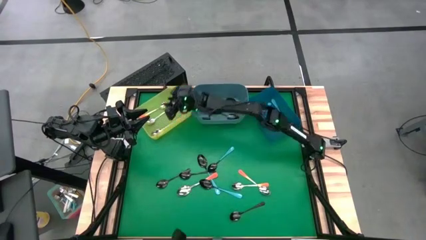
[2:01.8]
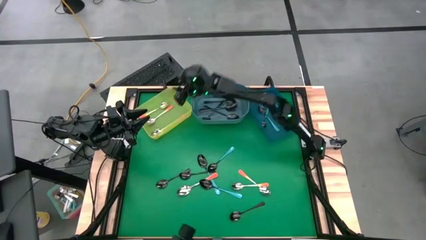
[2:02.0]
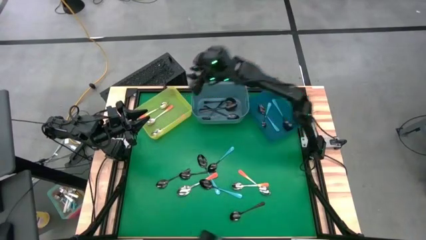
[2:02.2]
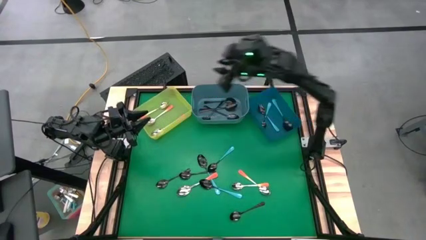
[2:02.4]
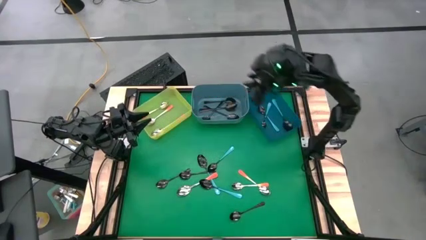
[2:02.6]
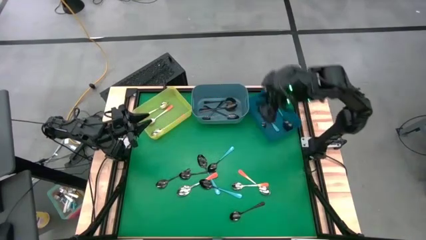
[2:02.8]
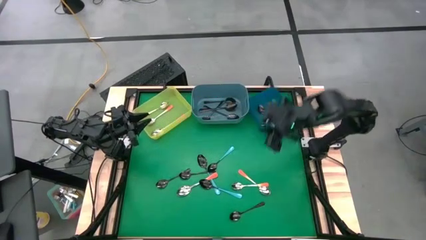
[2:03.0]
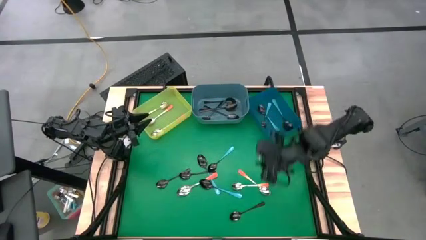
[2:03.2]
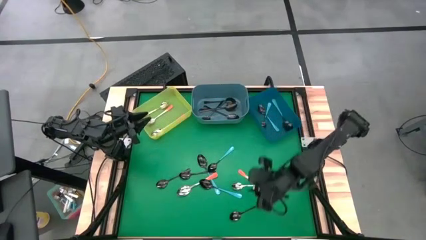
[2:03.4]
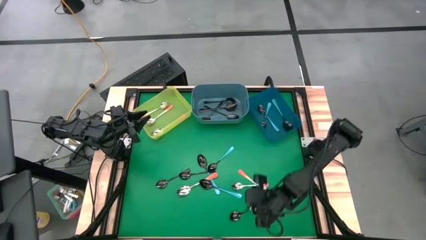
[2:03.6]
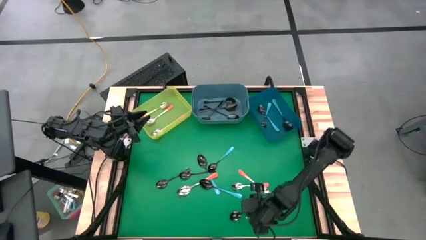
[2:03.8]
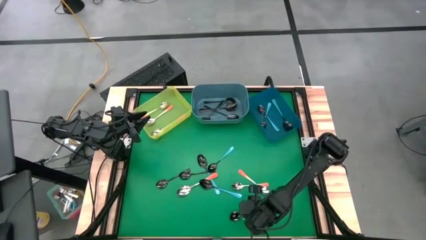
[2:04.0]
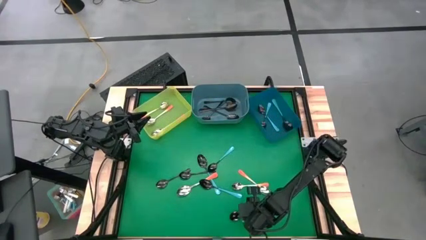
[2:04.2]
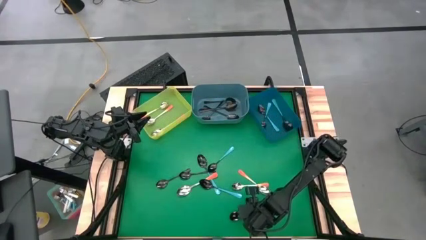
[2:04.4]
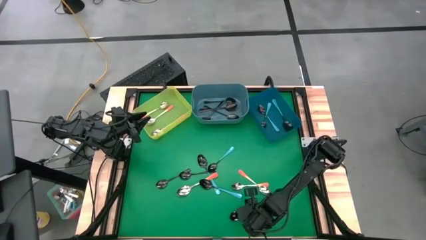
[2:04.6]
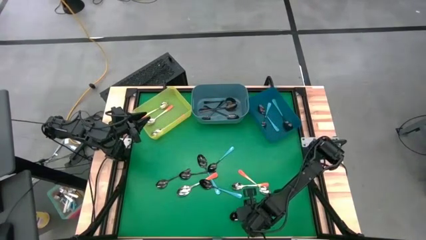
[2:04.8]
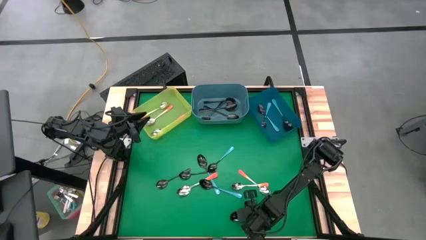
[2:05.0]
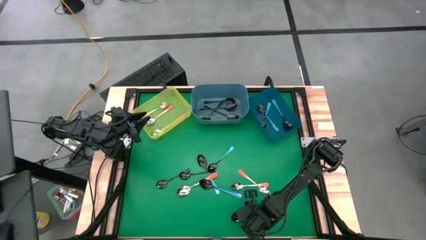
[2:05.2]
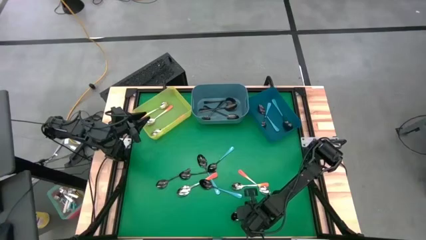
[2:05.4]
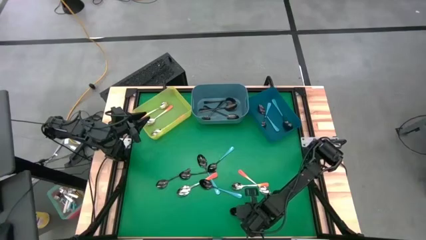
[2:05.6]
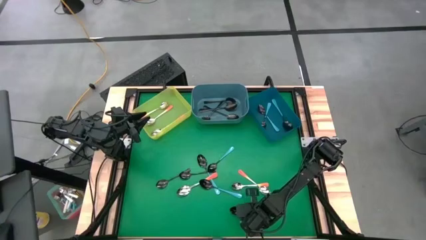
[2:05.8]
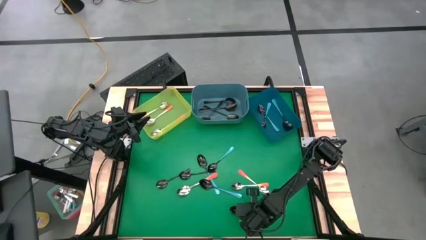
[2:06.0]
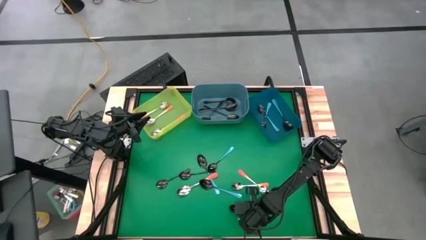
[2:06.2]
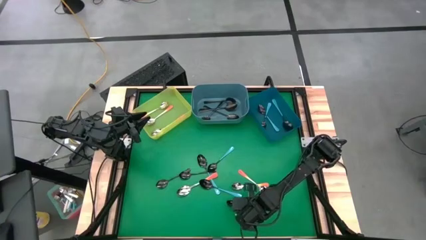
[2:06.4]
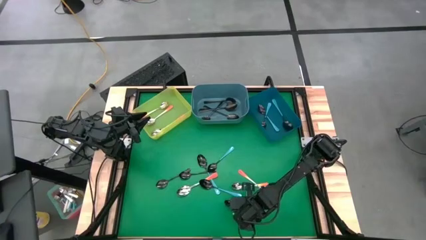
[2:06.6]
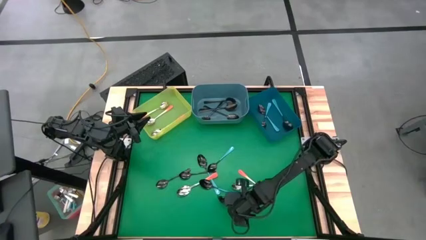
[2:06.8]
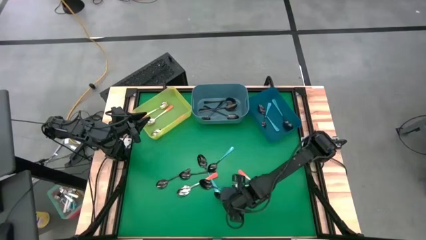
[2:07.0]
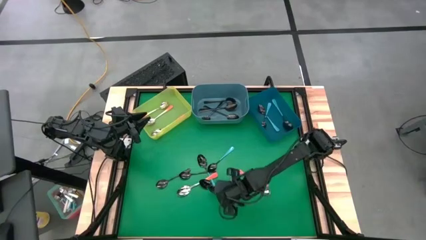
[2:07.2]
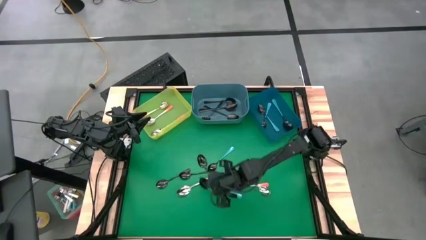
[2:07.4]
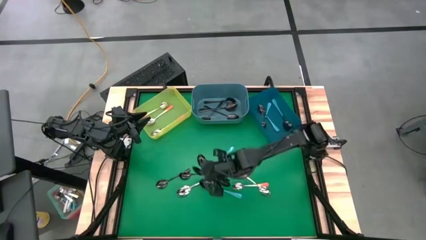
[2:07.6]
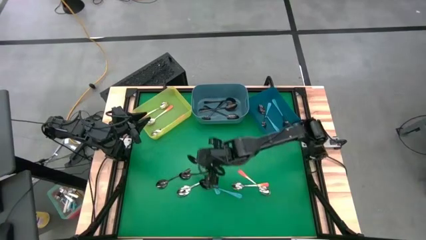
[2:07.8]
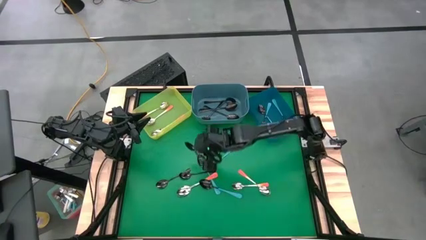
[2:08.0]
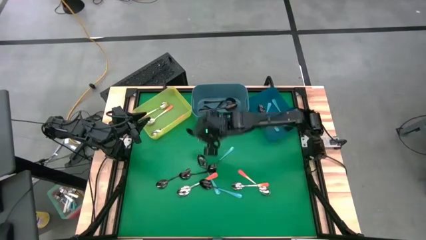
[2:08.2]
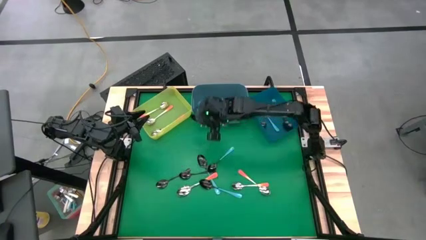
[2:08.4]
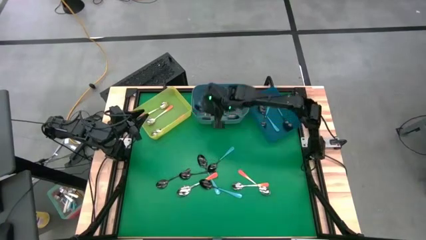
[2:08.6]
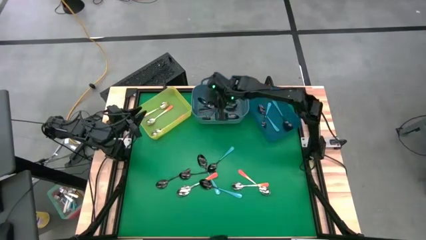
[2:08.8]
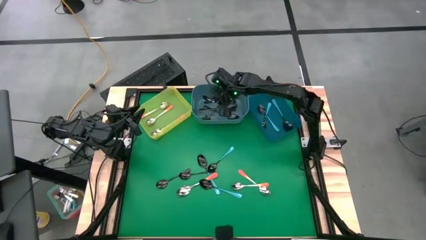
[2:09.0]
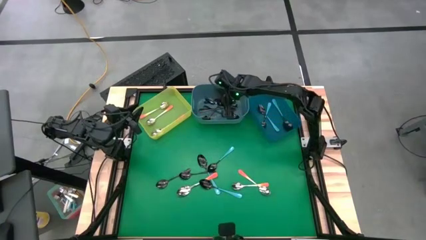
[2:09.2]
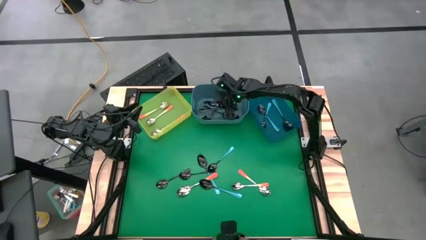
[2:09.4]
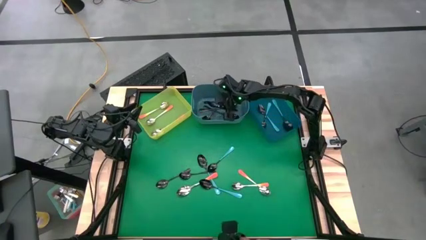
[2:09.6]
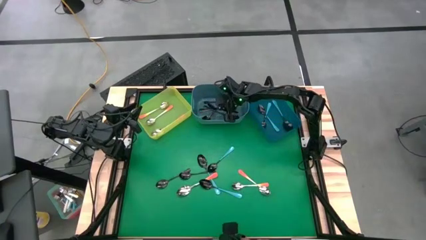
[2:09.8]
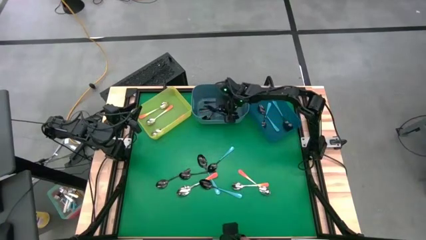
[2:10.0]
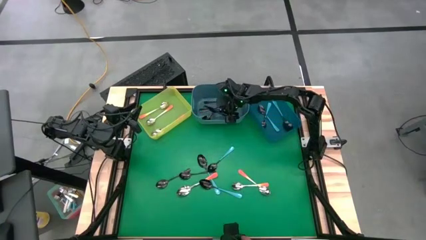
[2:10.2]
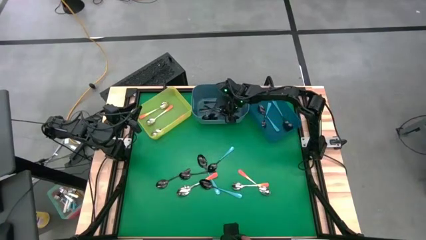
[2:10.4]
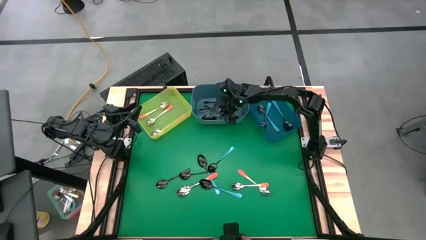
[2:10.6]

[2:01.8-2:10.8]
Task: Sort silverware by color (type)
Put the black spoon into the light blue bin

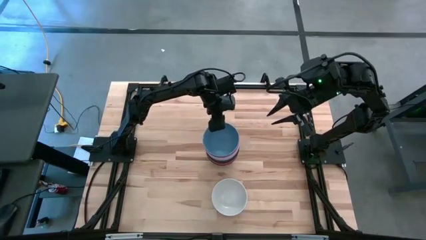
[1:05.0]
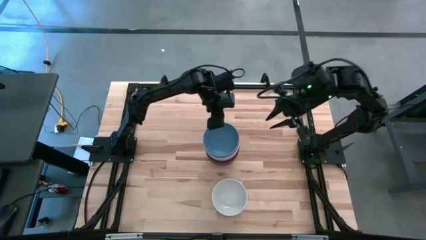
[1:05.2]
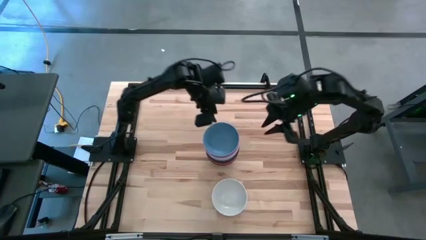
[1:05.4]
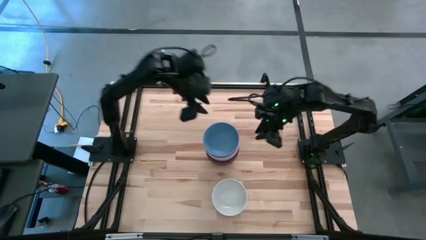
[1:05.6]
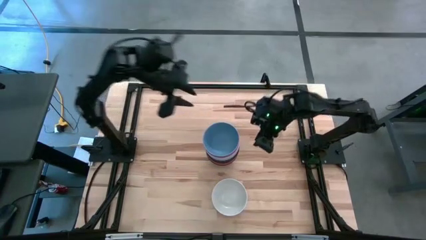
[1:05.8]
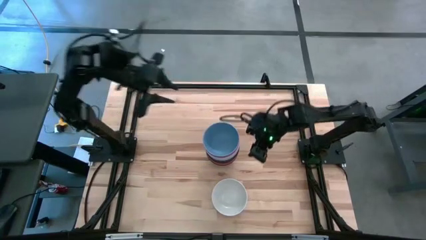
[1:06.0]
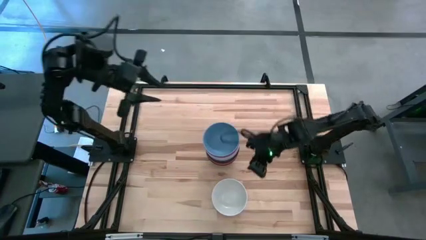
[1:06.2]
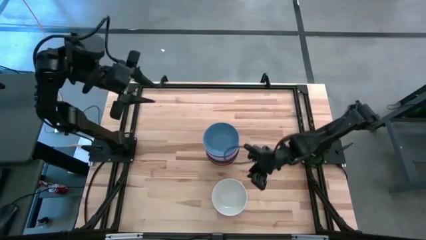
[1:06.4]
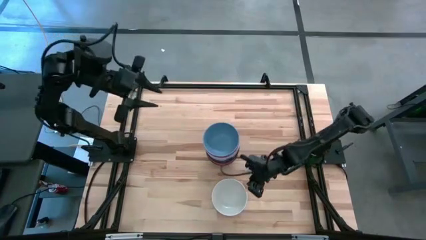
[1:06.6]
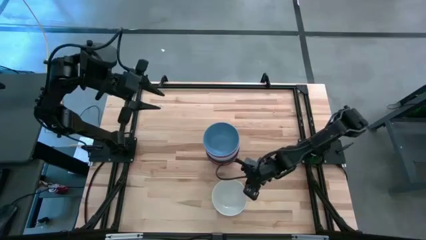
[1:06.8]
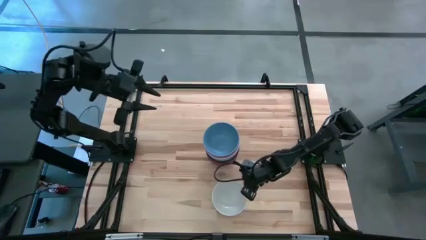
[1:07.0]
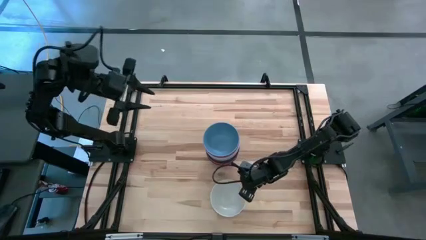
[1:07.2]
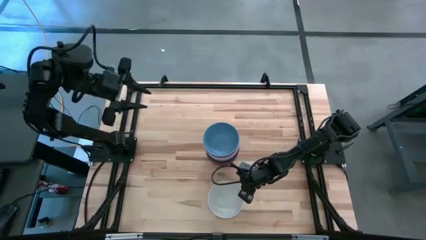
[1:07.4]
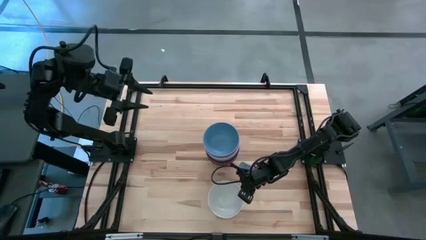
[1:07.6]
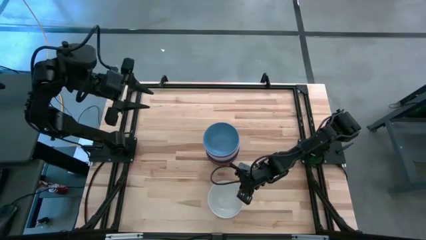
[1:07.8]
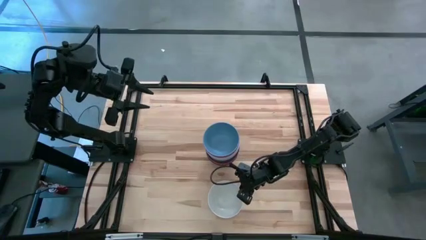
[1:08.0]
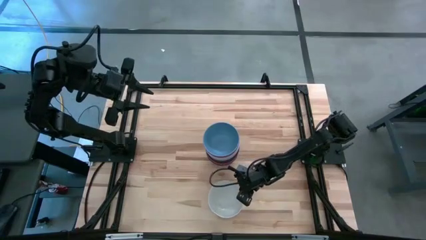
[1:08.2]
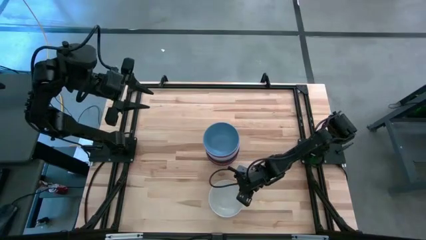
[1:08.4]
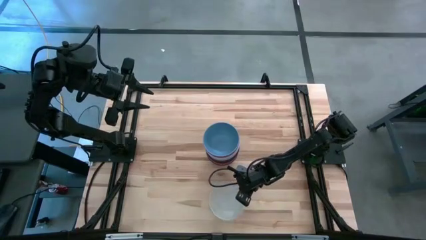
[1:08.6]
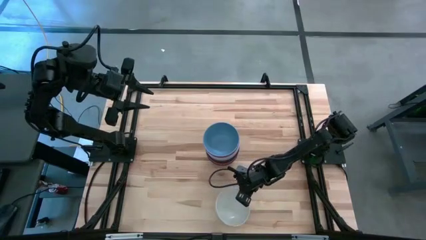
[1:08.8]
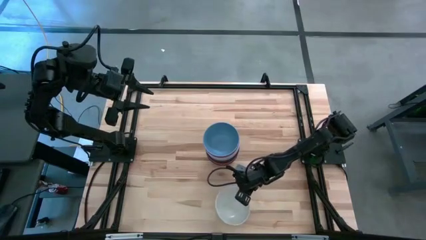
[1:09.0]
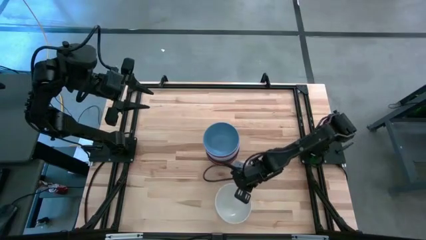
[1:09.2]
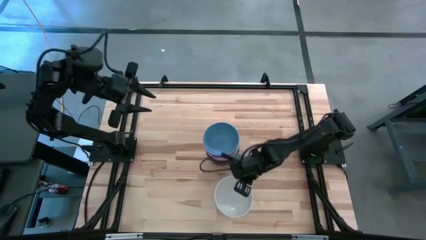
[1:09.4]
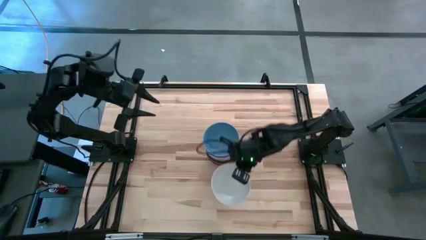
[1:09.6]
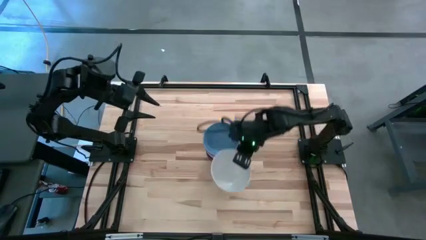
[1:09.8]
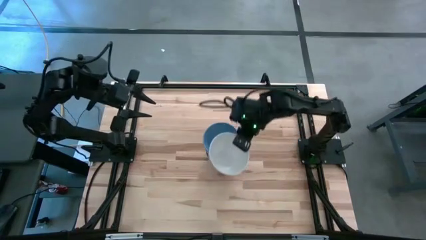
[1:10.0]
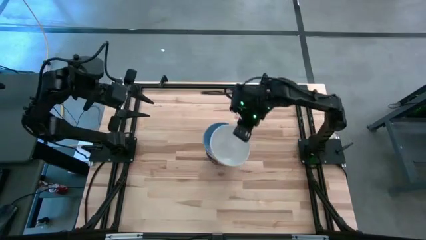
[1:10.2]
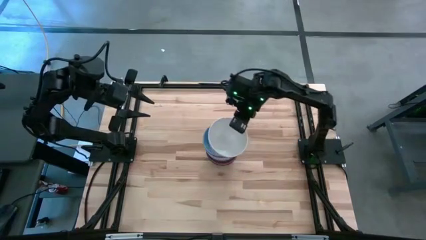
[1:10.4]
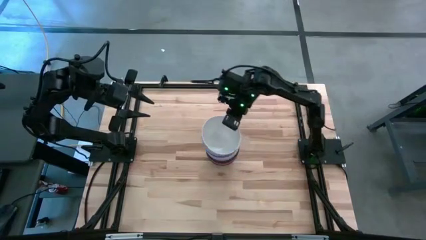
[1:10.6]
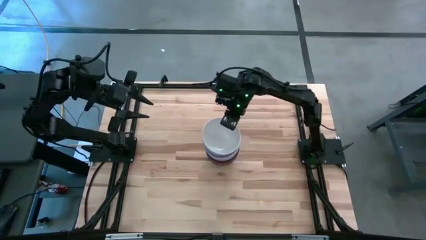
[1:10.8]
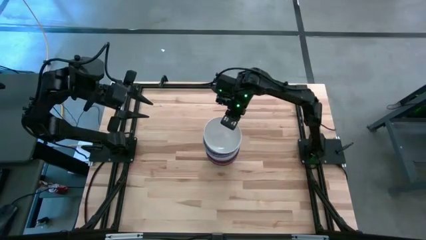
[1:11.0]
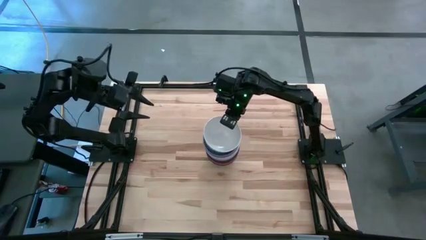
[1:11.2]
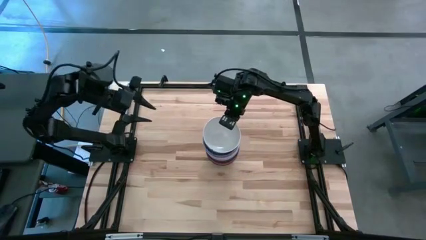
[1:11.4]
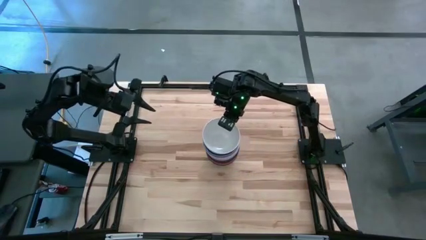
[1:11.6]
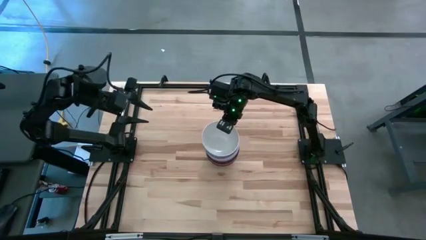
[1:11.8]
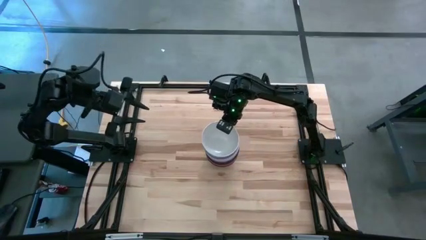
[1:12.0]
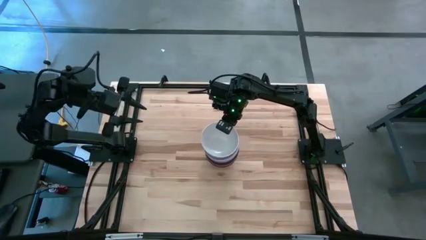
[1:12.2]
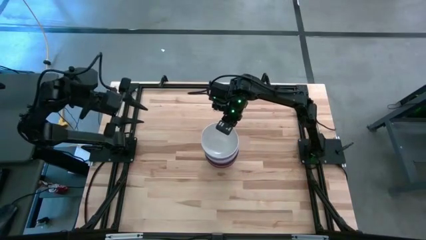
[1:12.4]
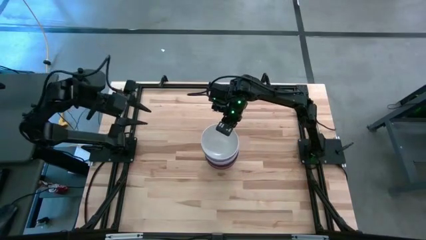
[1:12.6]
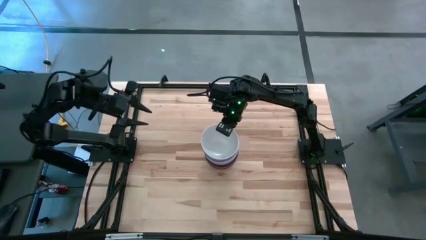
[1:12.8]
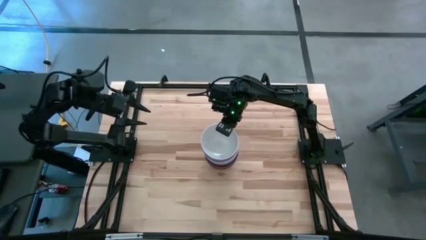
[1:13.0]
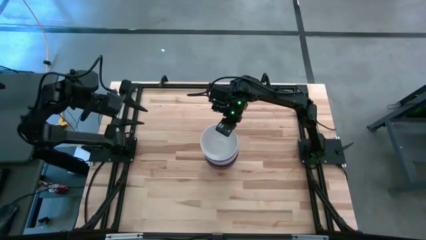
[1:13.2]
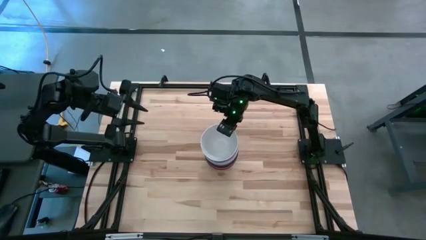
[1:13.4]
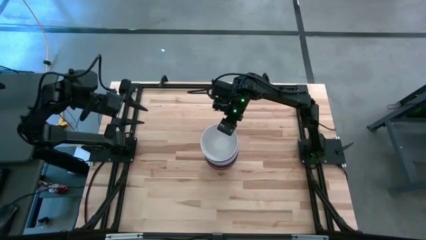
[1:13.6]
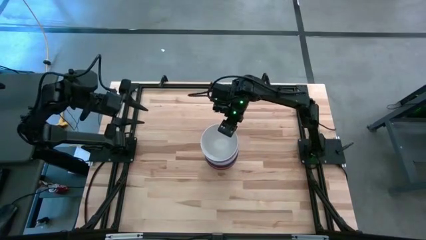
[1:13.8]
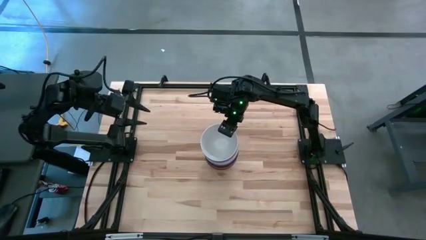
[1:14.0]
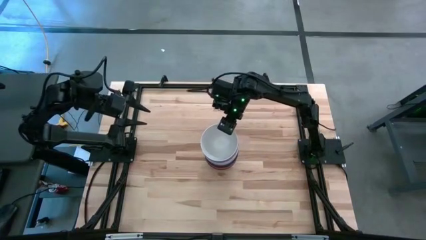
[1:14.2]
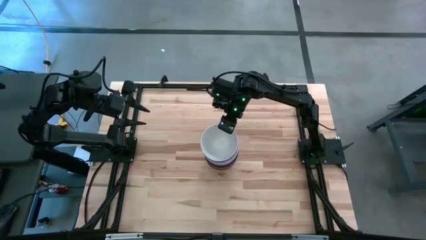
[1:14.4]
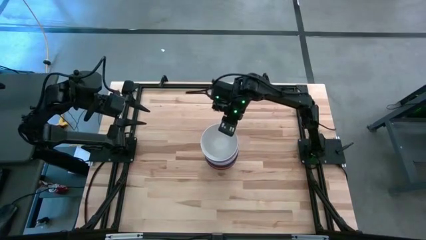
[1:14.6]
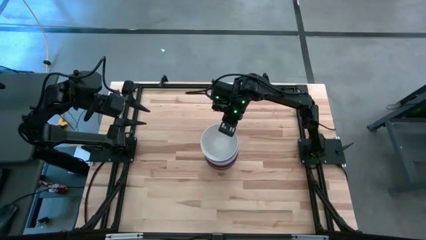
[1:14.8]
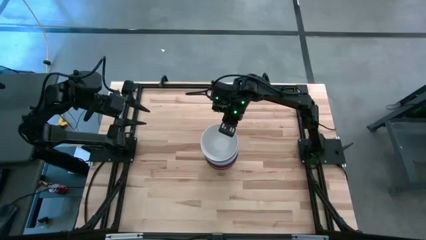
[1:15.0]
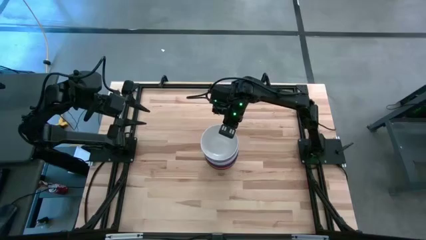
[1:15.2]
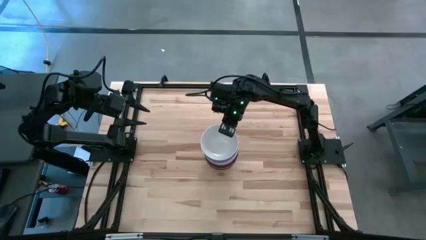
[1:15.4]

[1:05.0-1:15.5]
Task: Nest bowls inside each other
Stack the white bowl on the blue bowl
